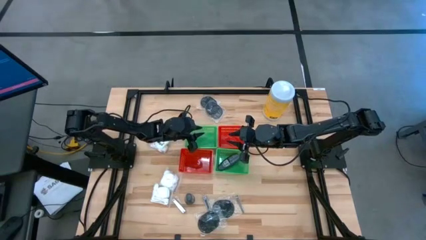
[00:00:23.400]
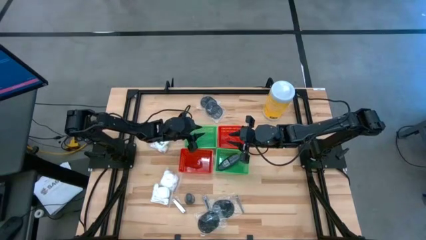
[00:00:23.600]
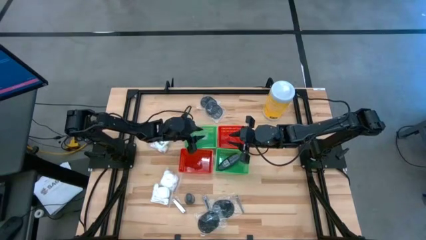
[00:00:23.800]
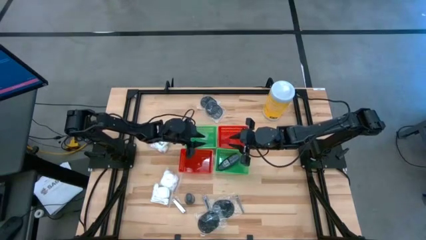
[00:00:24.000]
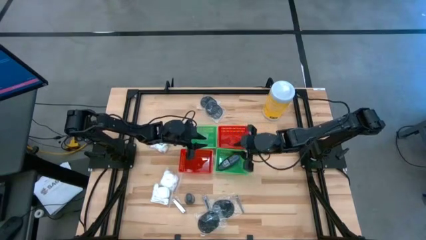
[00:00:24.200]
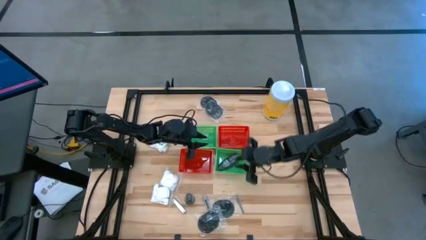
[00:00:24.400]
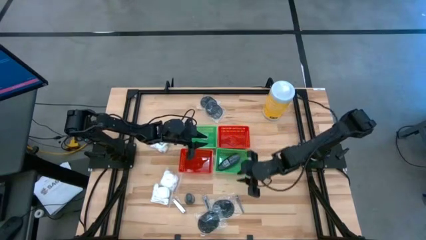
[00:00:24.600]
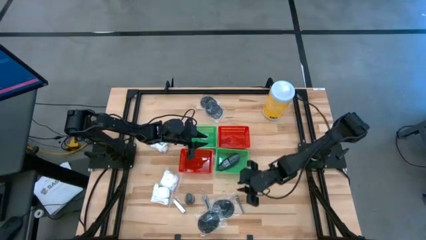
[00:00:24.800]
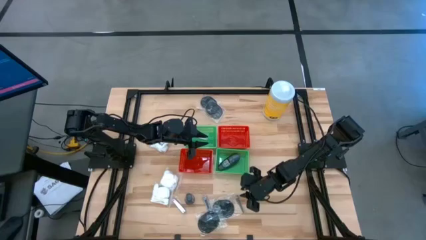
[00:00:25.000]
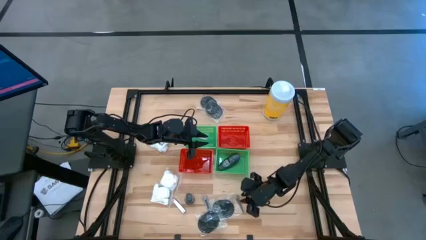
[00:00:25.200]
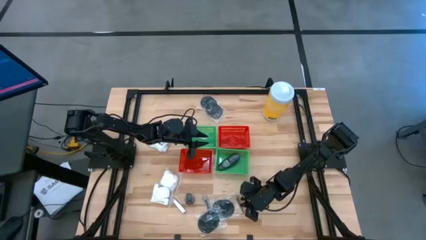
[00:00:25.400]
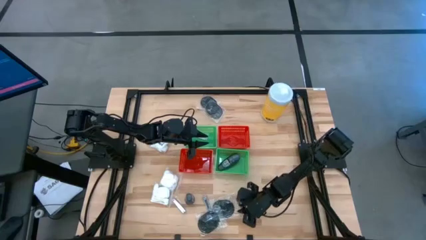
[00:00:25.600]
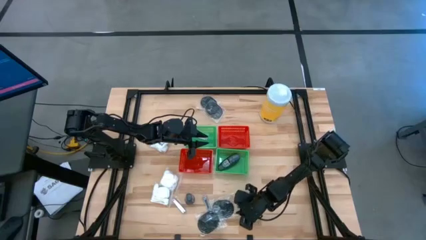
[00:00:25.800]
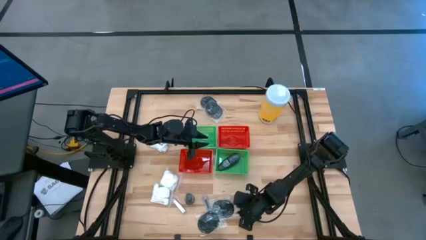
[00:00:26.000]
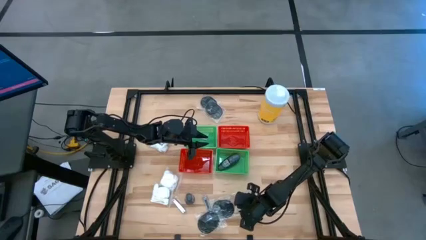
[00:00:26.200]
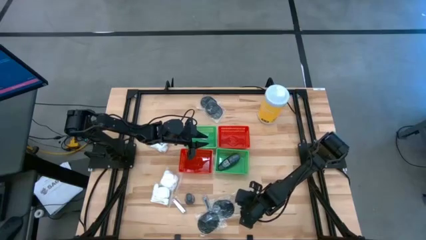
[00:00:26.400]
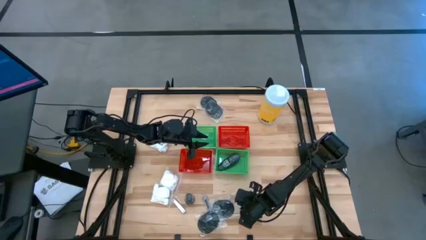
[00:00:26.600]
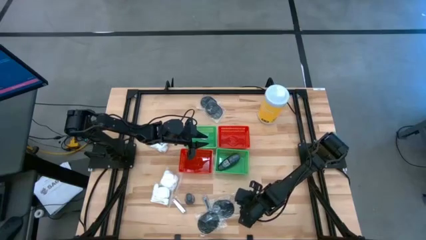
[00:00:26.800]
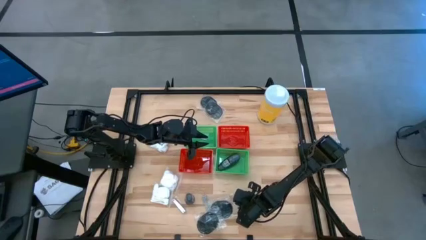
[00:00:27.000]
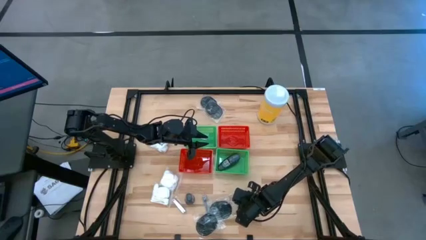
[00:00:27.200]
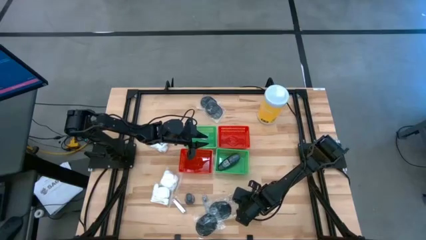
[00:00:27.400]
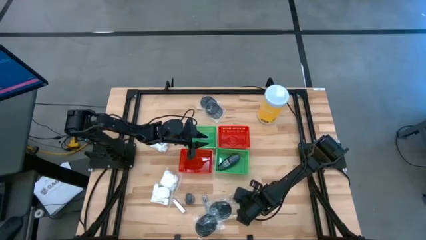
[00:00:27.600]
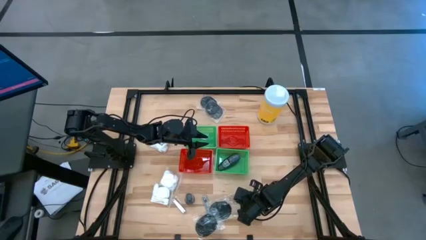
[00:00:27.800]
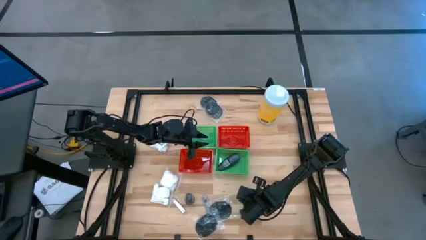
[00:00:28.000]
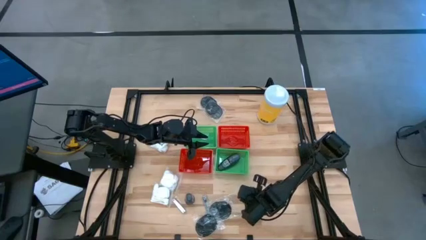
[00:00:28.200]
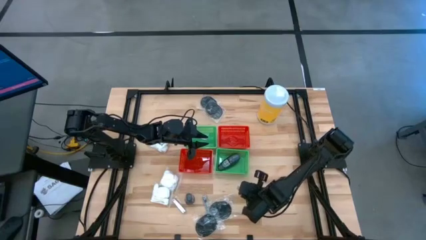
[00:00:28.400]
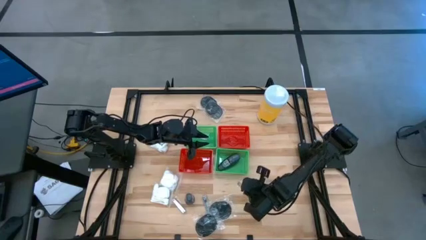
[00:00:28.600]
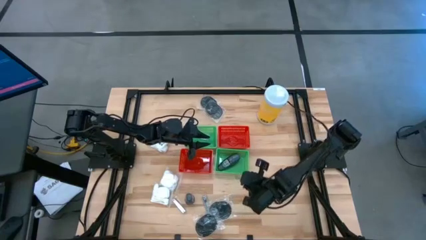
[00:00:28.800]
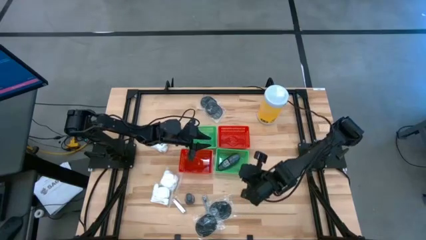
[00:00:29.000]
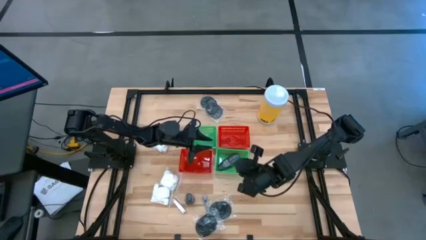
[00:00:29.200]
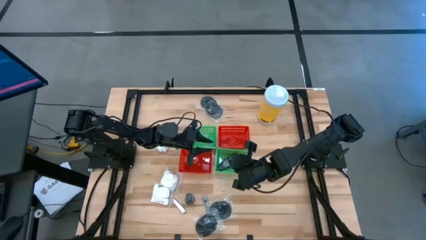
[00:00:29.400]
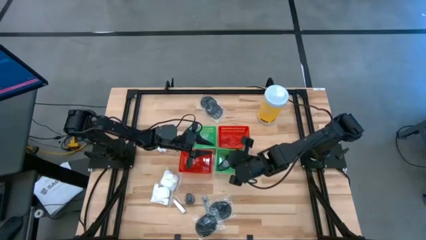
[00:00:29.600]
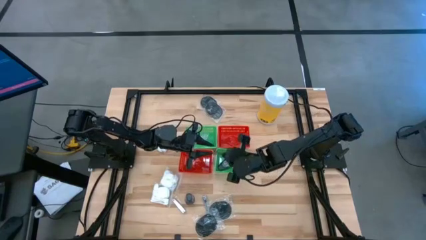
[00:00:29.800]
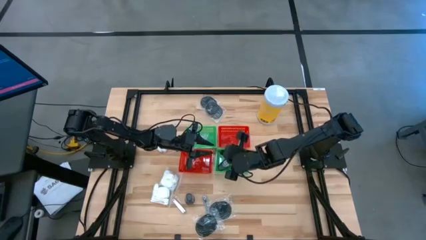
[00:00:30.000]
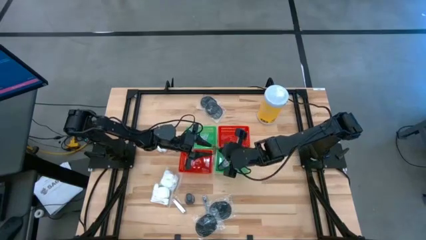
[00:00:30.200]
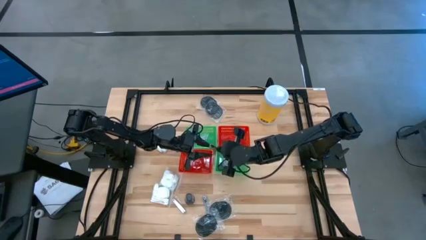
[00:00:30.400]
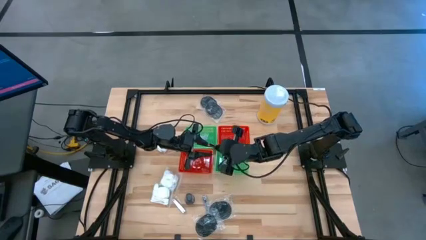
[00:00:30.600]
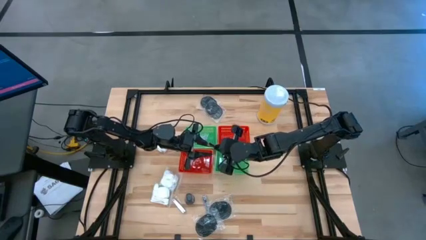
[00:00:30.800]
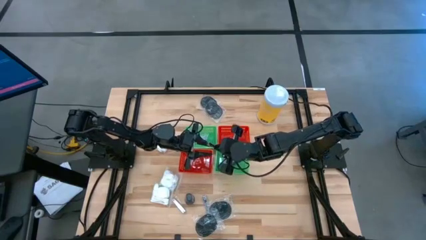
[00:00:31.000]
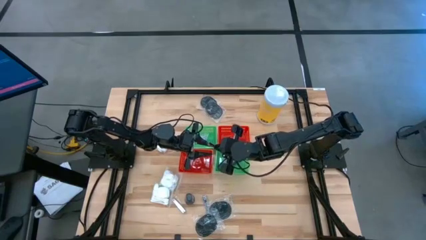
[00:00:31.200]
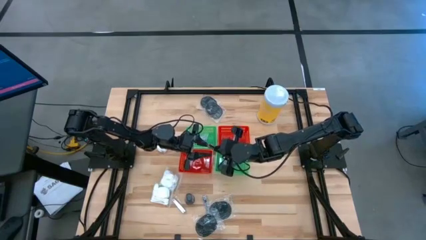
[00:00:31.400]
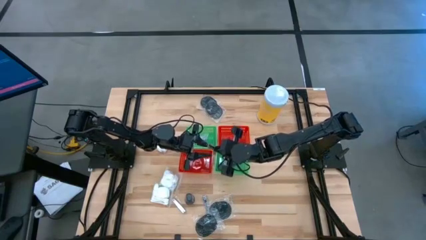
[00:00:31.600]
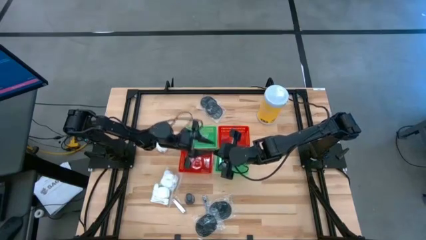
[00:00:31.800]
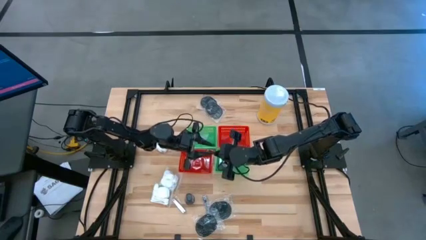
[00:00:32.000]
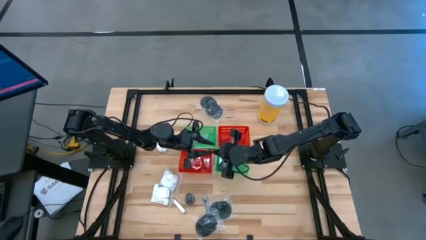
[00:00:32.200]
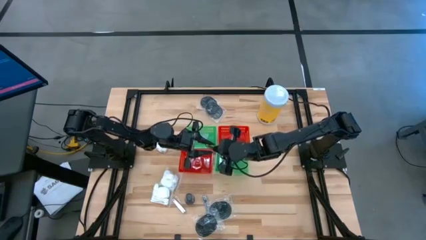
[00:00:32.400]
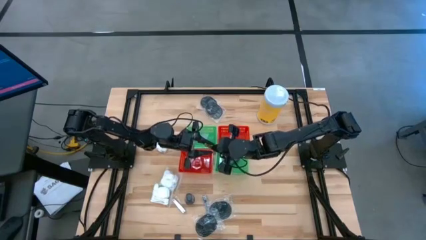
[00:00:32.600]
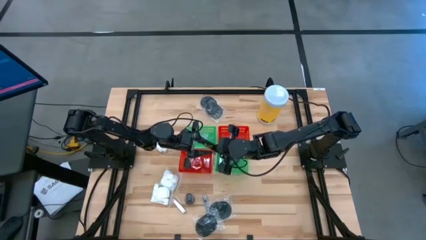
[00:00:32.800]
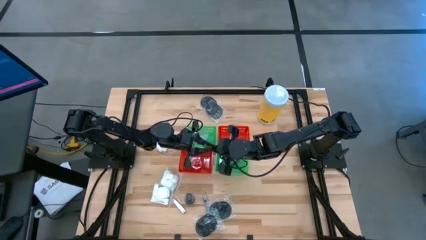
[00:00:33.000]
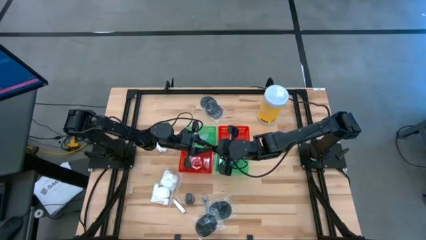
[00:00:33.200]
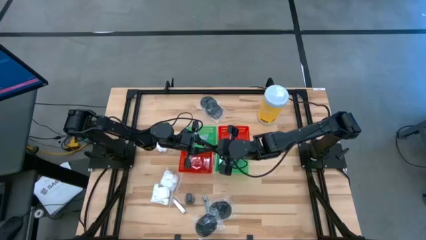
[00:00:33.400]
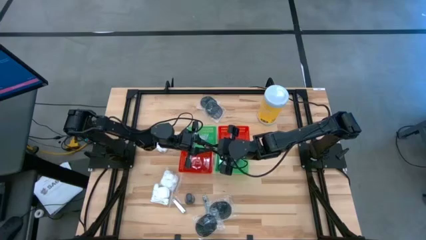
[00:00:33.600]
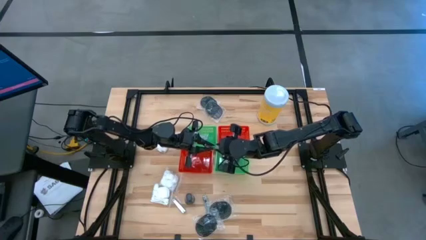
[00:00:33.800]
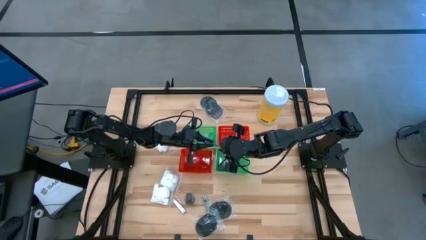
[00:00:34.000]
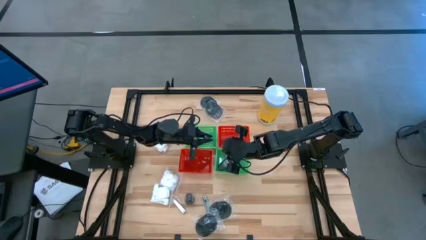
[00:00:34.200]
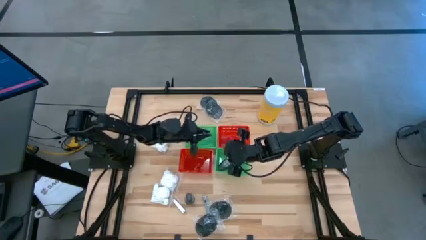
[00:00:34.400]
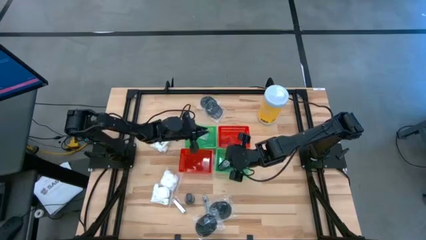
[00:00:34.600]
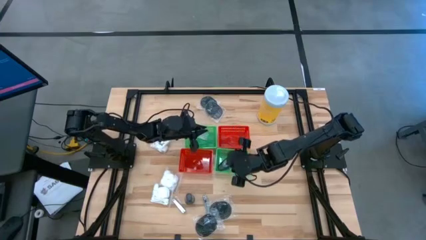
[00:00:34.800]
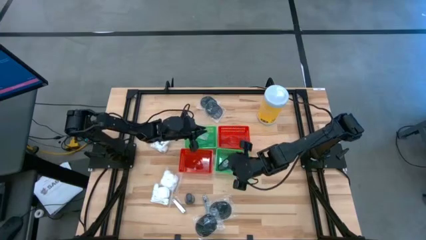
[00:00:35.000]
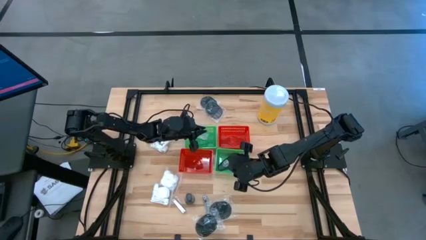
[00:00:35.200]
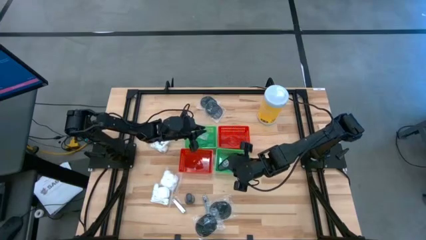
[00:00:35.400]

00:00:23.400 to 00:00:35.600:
Task: Pick & Place Travel size toiletries
Put the silver nail cutter into the left green basket

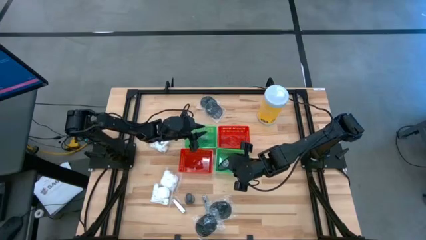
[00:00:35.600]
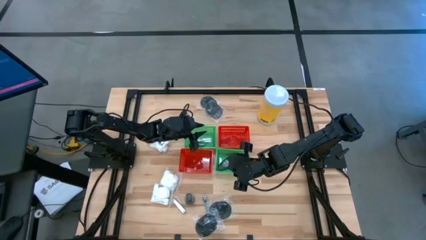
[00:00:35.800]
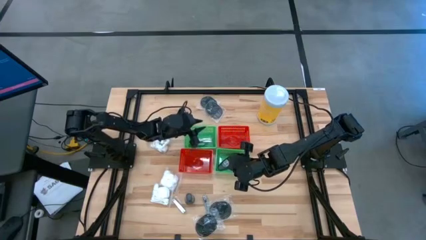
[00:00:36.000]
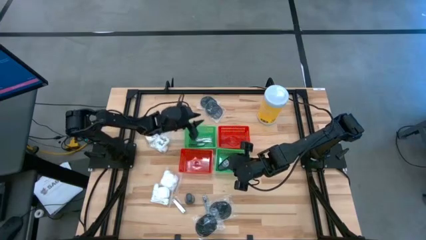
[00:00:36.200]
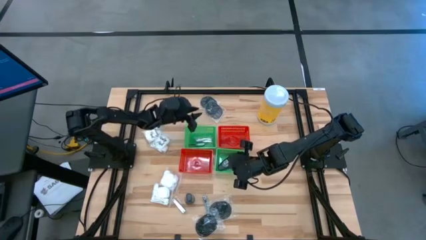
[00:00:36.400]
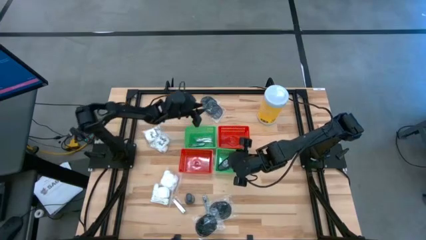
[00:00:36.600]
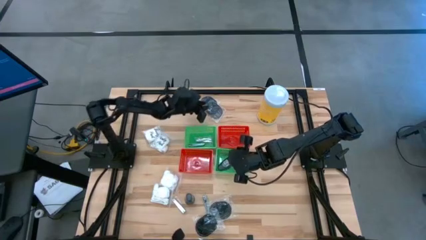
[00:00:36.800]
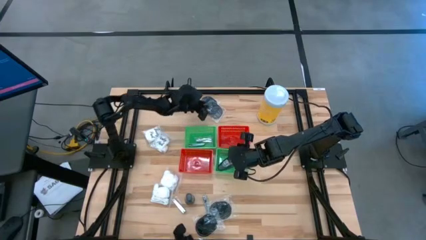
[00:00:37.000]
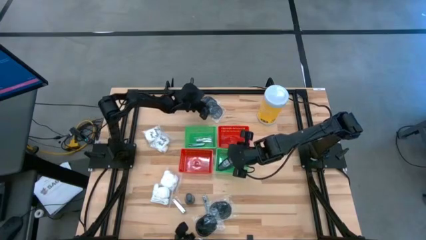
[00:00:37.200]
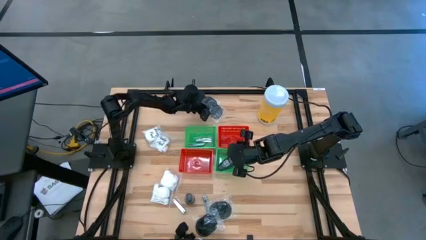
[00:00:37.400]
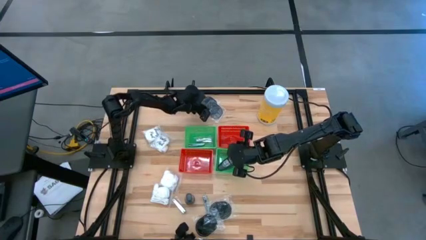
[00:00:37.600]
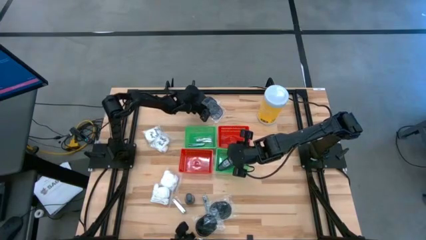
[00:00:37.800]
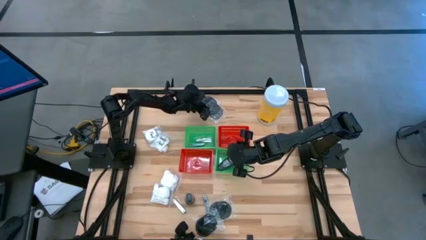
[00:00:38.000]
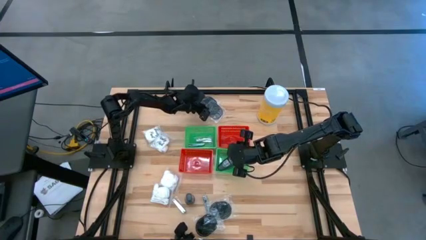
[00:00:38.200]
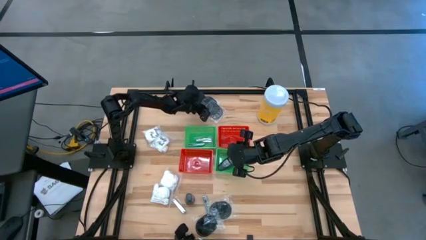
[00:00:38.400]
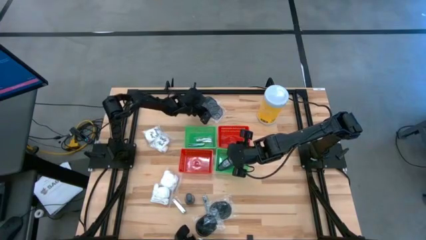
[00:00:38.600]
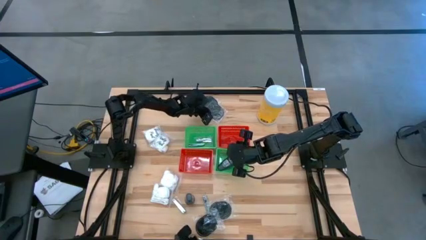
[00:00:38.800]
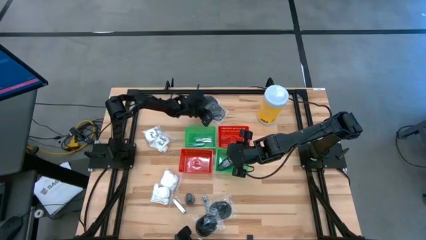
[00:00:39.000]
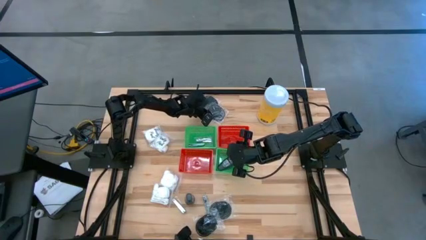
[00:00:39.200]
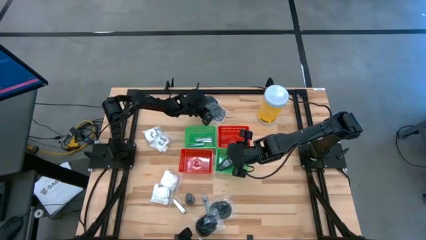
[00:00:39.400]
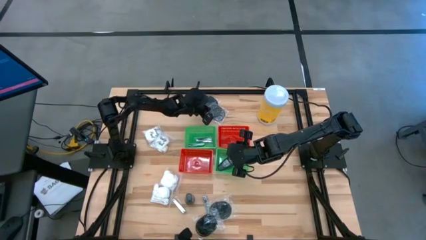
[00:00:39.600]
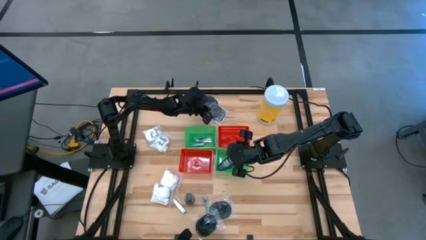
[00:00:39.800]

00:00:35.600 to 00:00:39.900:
Put the black hairbrush into the right red basket
